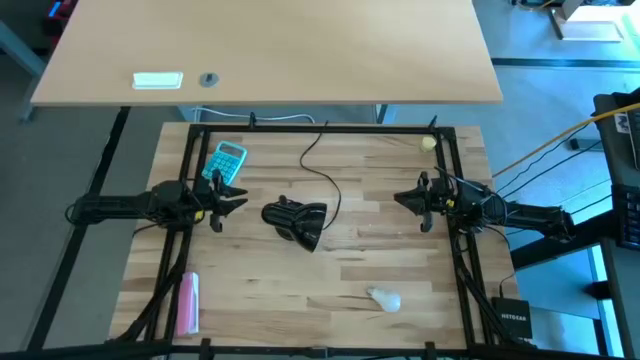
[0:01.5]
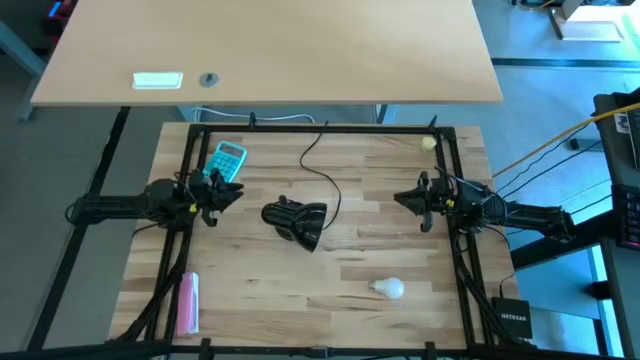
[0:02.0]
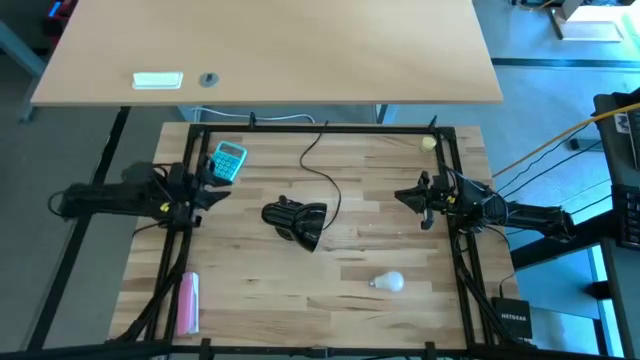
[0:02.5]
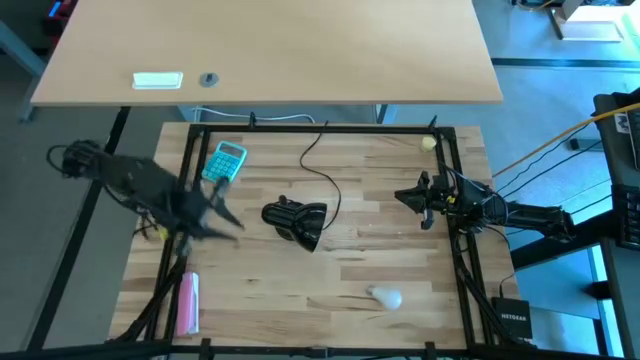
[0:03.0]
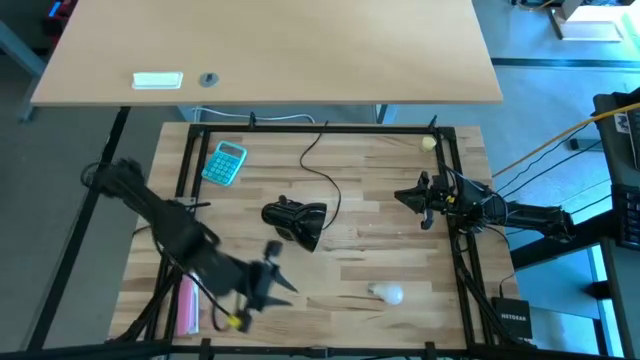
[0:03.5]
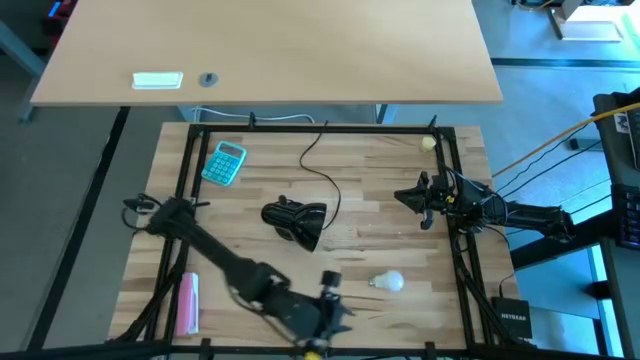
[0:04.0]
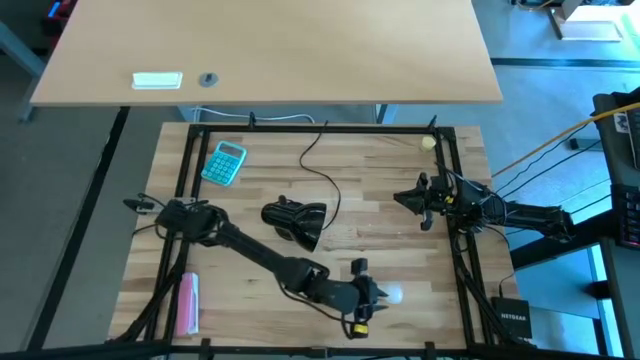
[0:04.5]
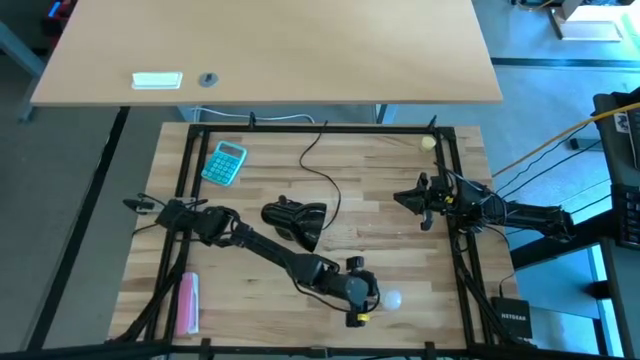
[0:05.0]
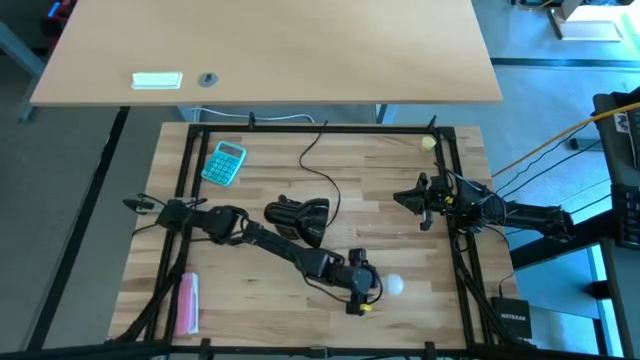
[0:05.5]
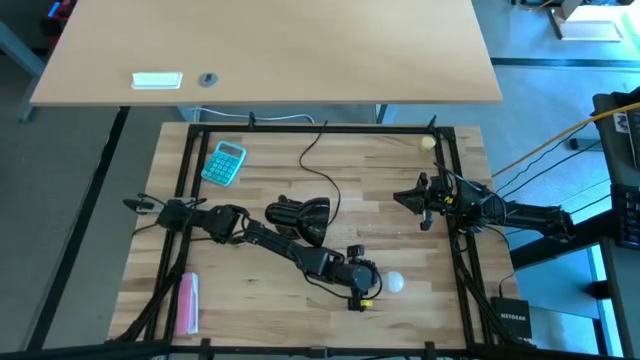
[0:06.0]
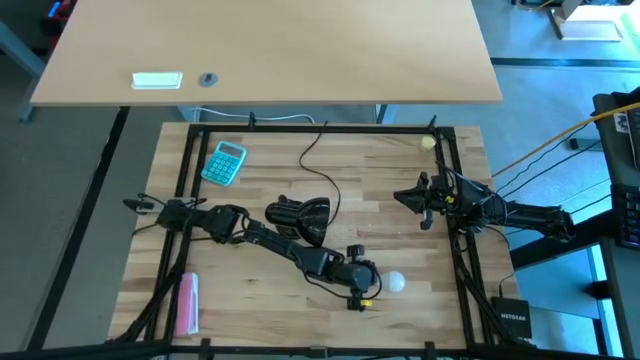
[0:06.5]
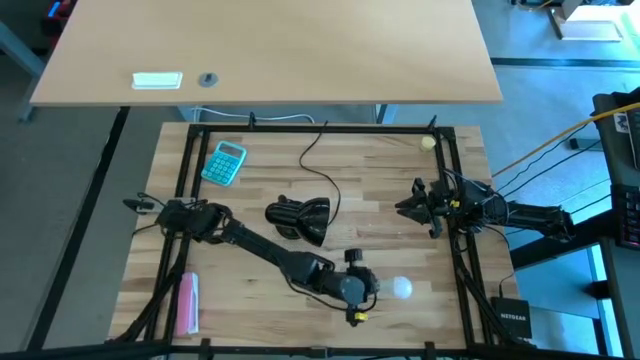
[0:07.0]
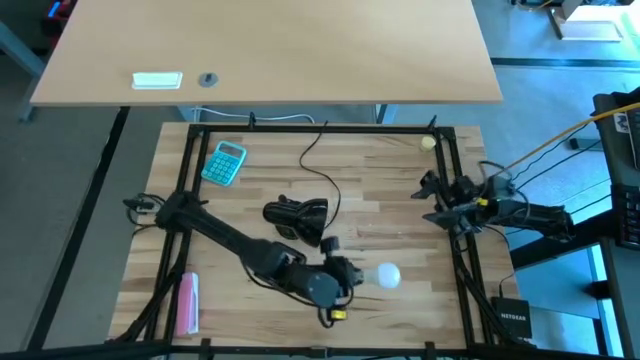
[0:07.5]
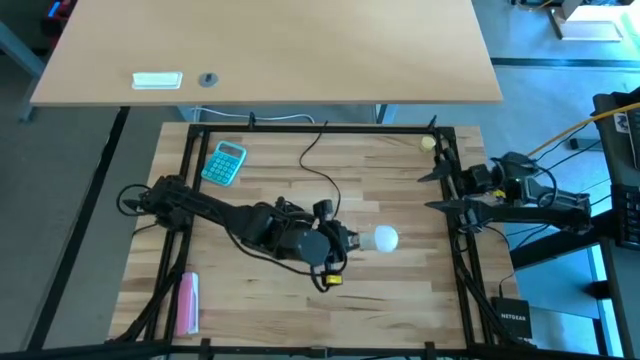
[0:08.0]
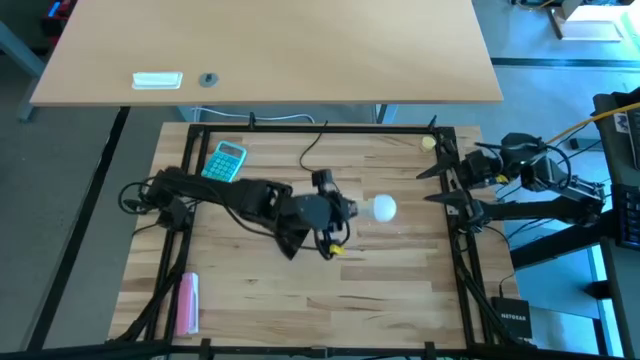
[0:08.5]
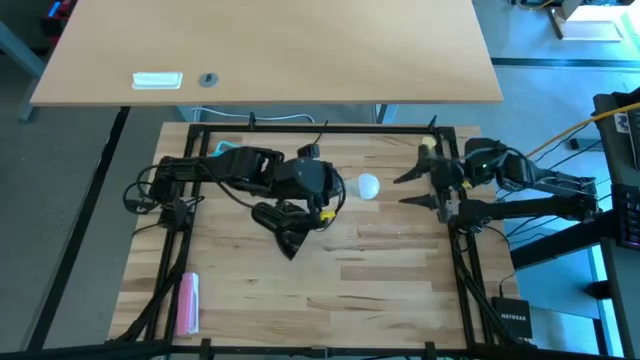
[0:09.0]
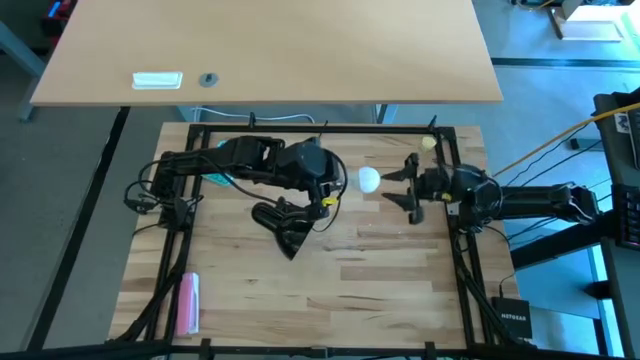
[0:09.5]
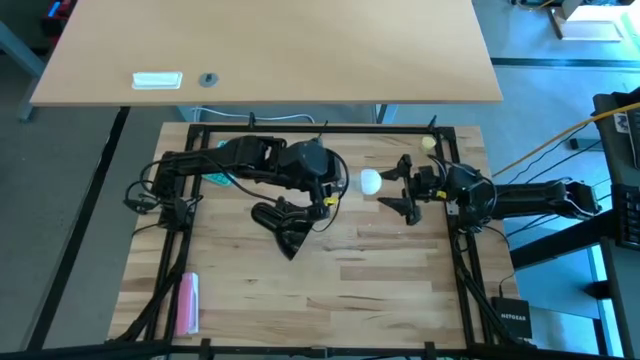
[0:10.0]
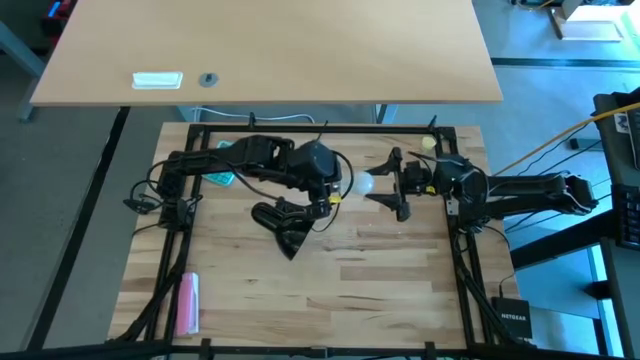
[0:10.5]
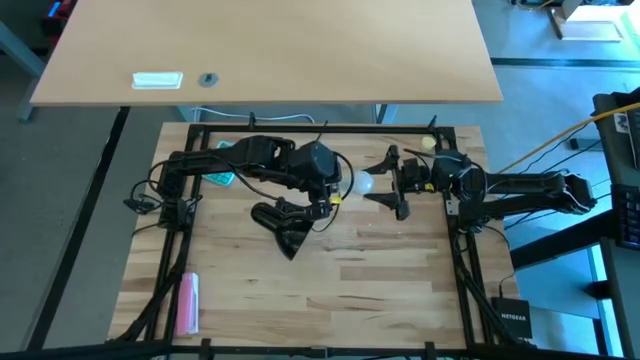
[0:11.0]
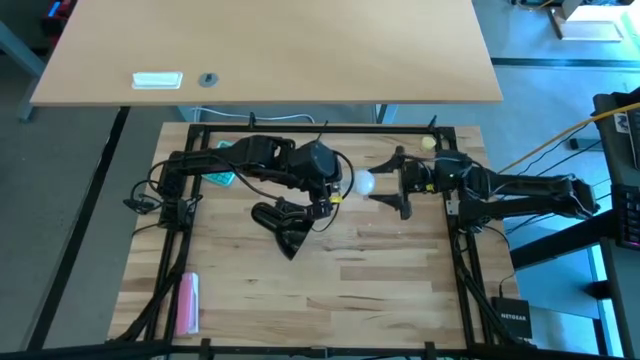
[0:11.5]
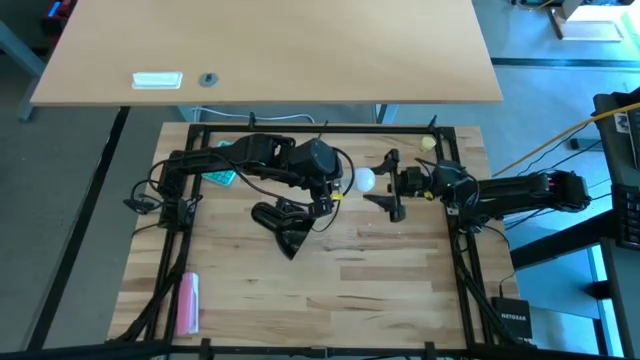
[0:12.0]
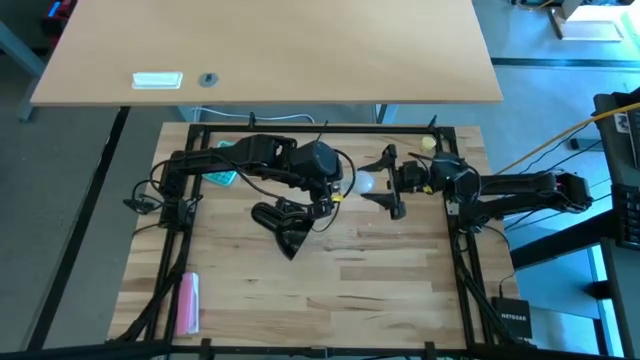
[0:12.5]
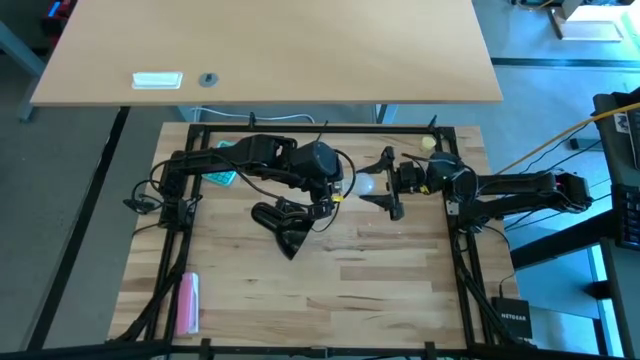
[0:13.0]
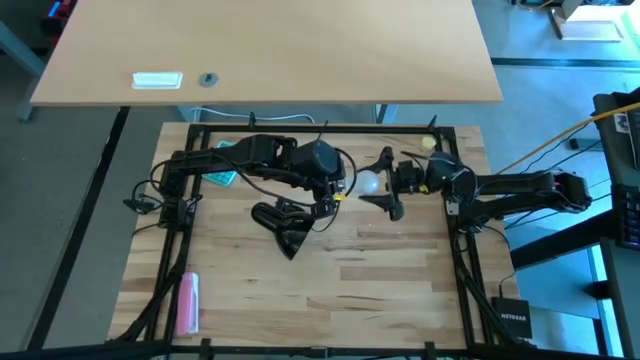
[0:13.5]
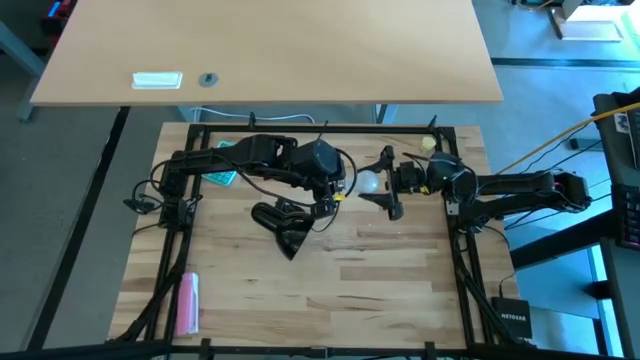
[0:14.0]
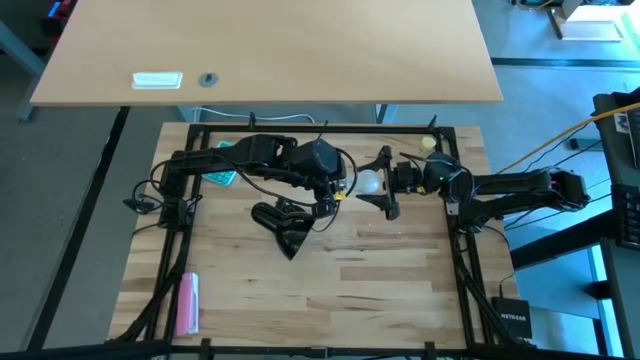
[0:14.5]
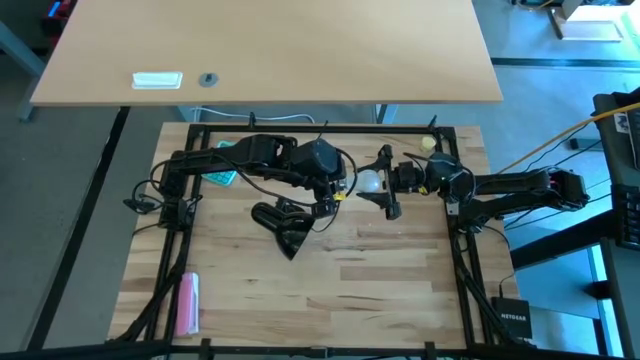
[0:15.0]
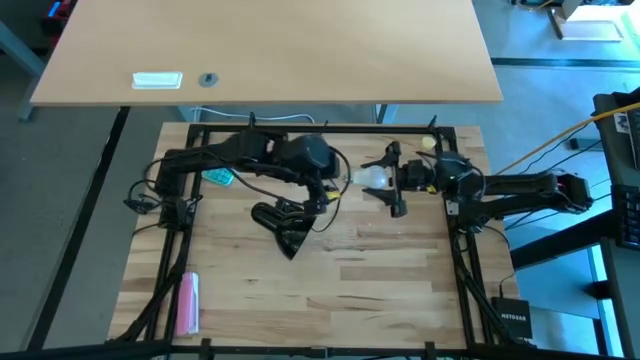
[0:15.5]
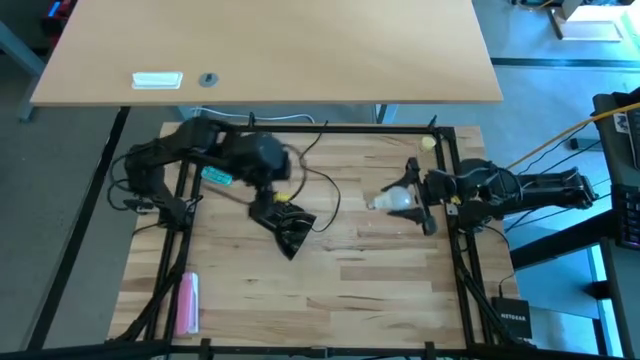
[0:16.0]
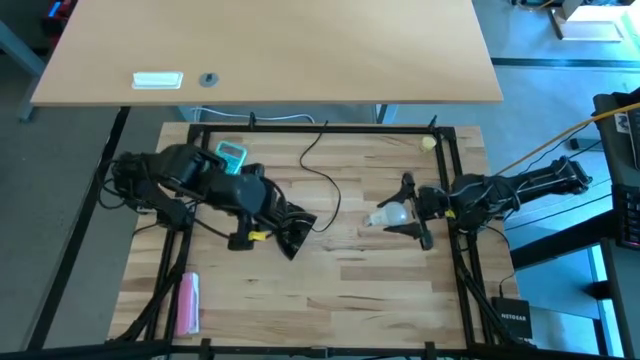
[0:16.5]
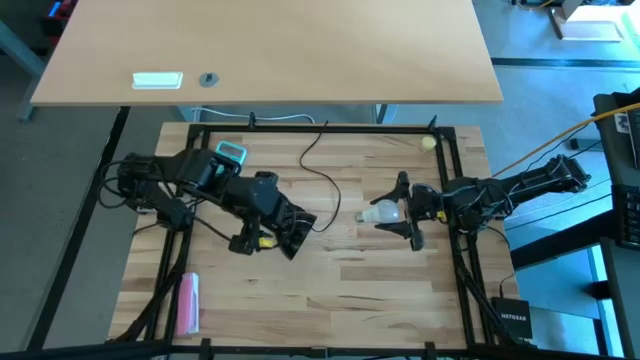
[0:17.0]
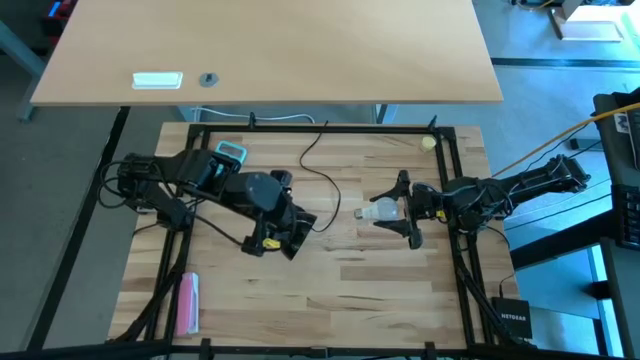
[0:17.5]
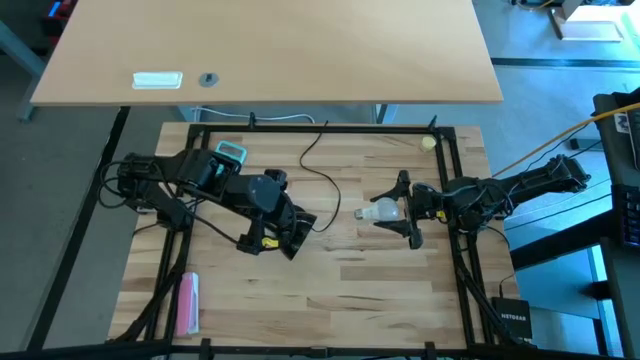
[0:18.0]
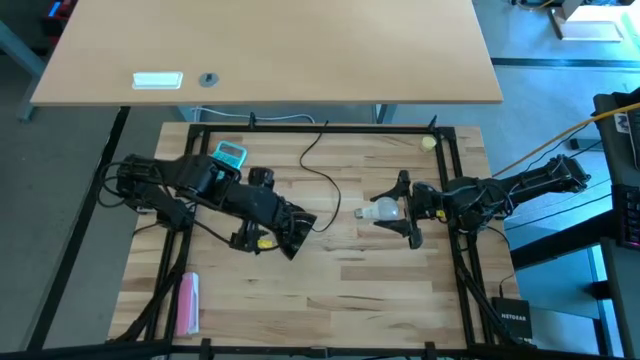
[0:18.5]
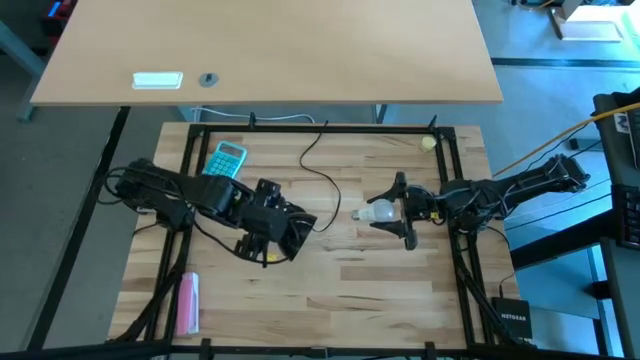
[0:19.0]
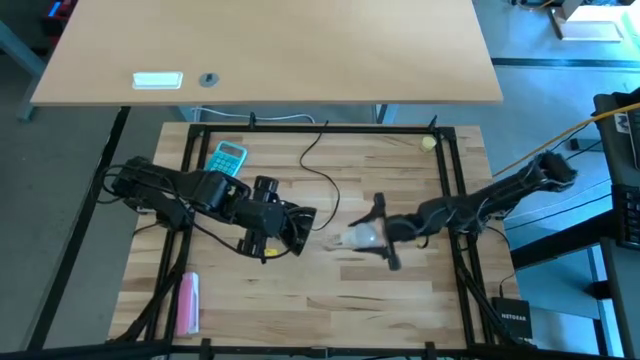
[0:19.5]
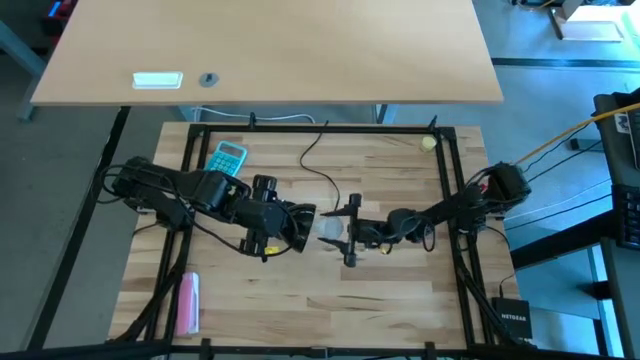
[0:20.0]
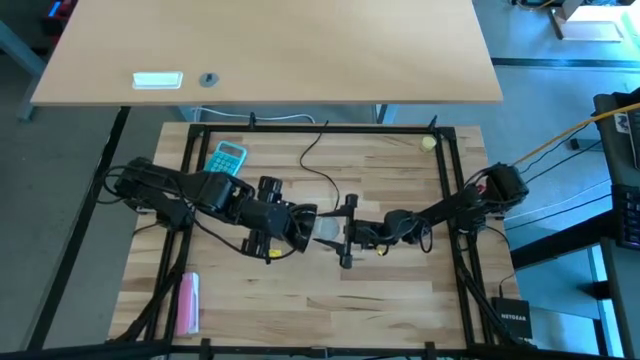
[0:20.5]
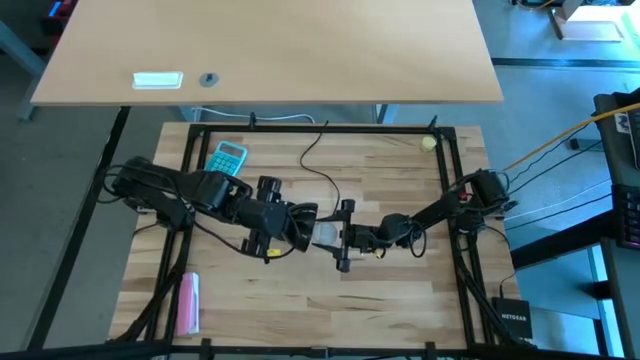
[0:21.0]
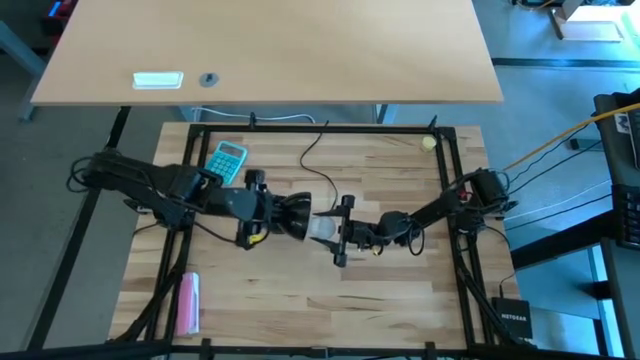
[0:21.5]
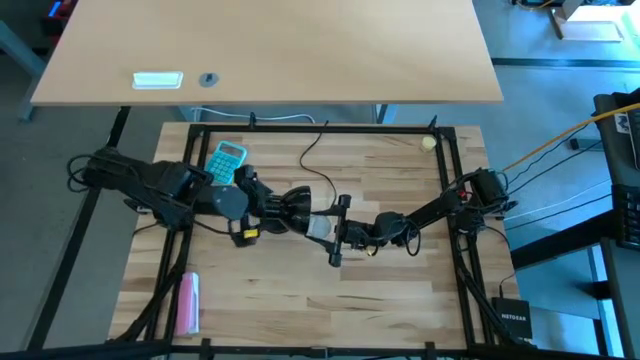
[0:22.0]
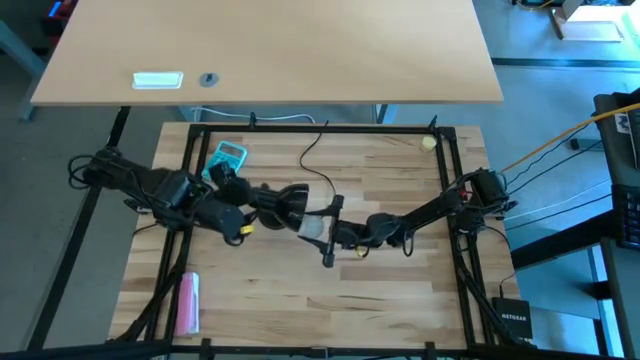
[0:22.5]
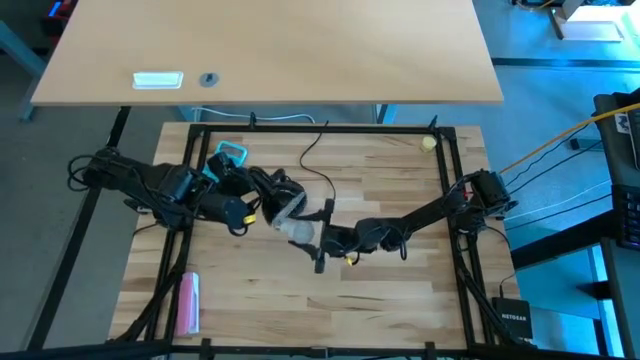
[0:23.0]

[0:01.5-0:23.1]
Task: Screw lightbulb
Insert the lightbulb into the black lamp
